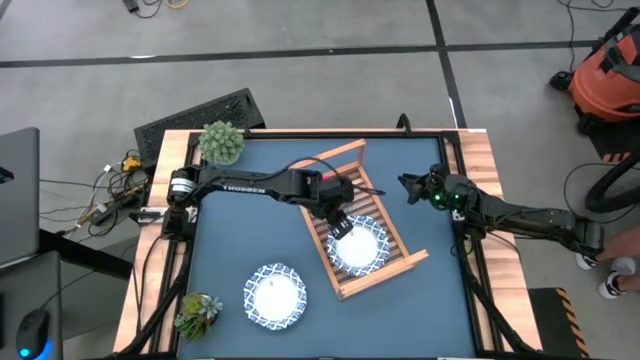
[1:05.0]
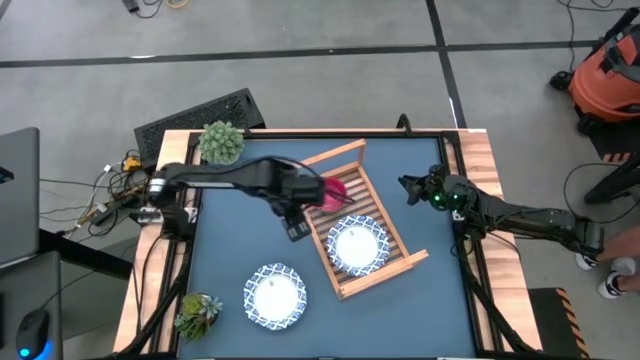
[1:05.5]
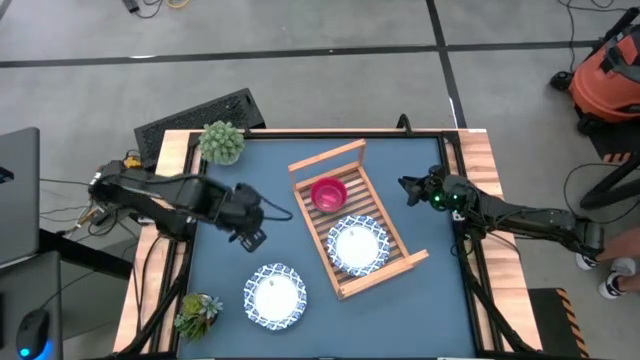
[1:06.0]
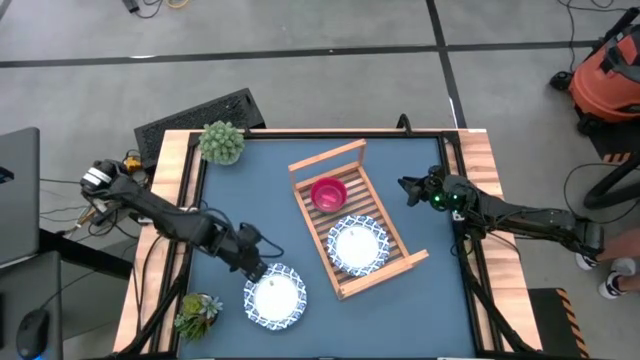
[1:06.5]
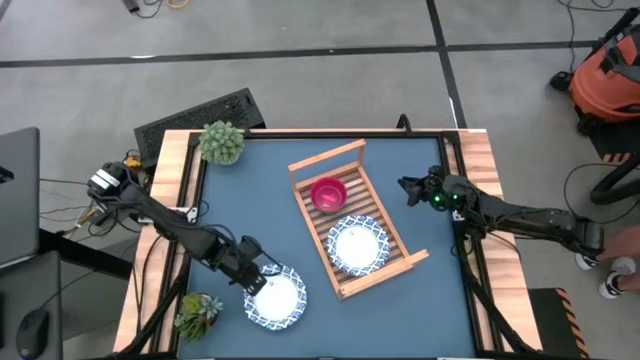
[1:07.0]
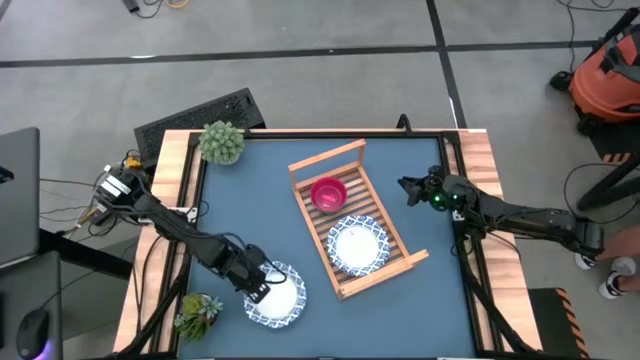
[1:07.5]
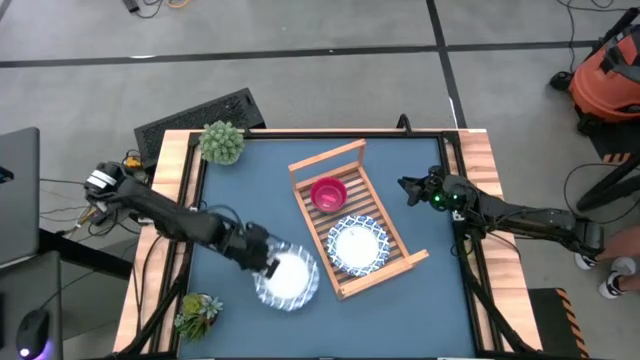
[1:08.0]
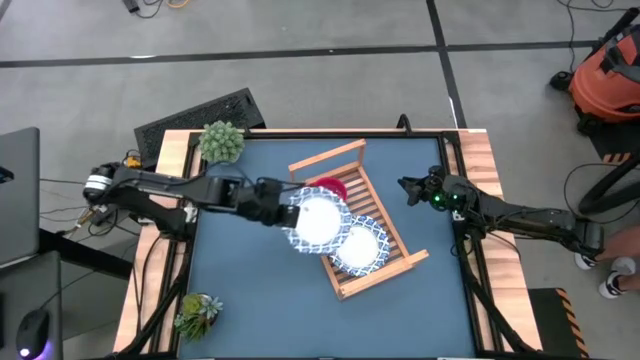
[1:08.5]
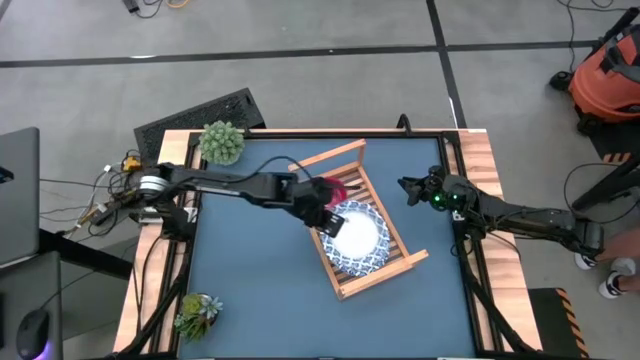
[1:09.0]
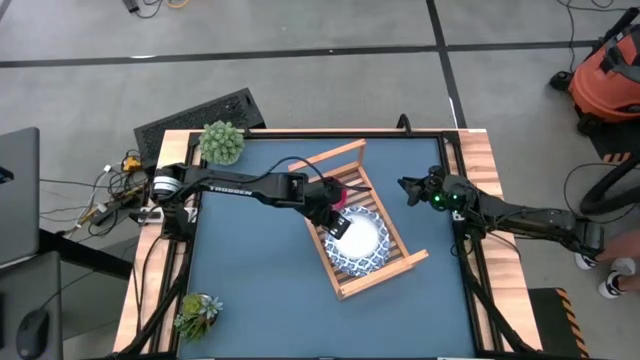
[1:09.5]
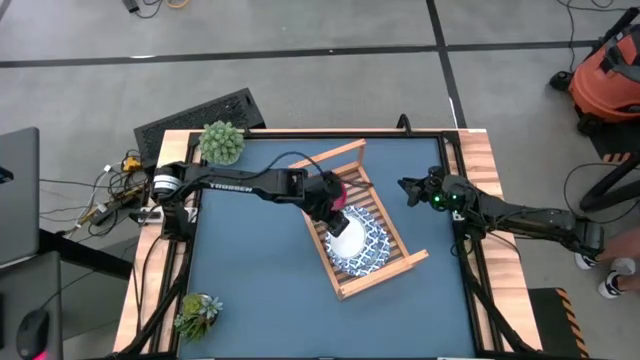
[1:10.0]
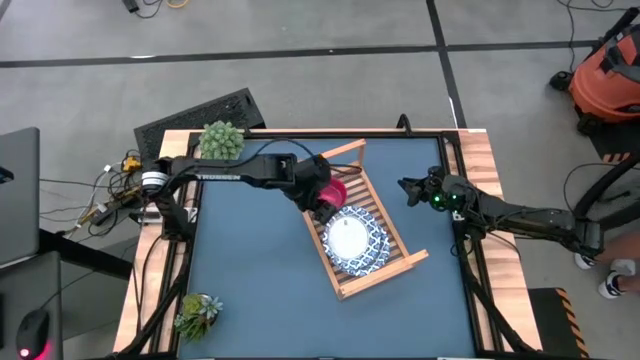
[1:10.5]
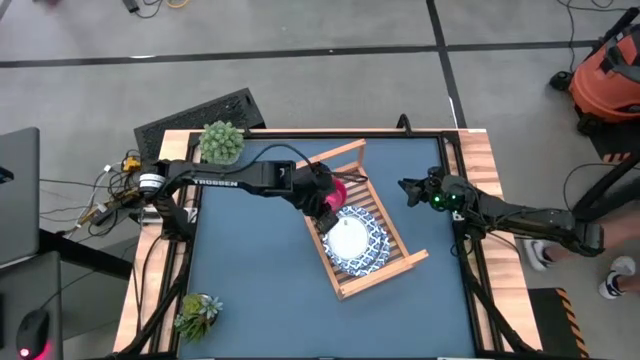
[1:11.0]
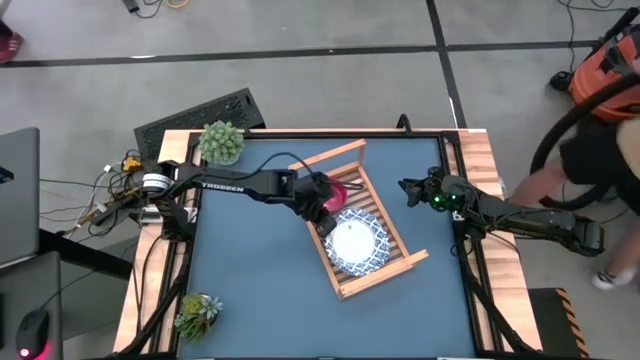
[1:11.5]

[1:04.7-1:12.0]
Task: Place and stack bowls onto a shelf
Stack the white blue bowl on top of the white blue bowl on the shelf

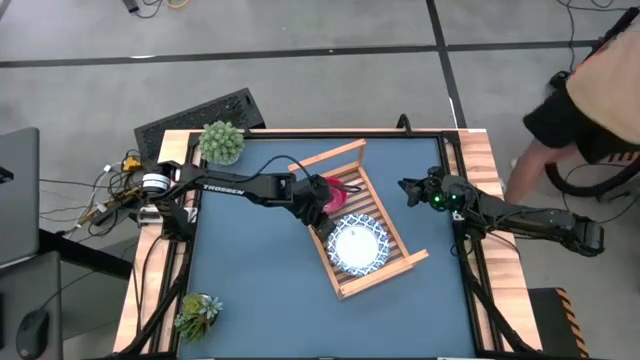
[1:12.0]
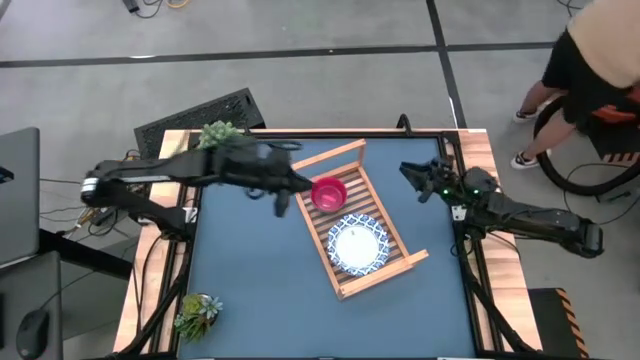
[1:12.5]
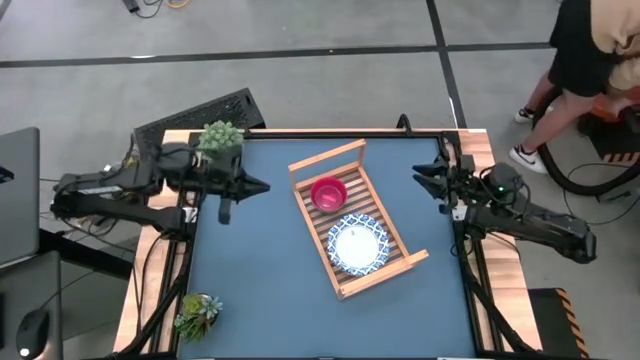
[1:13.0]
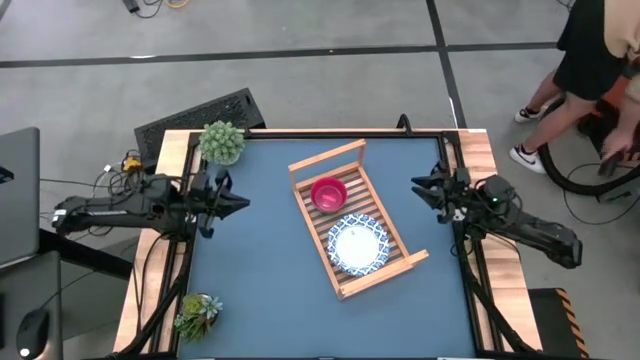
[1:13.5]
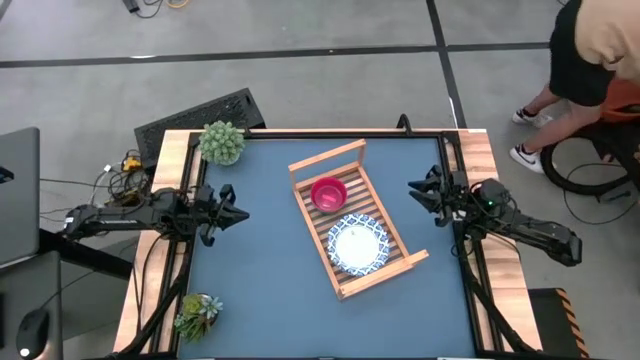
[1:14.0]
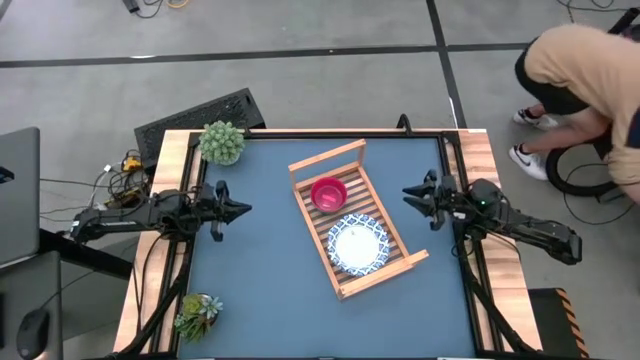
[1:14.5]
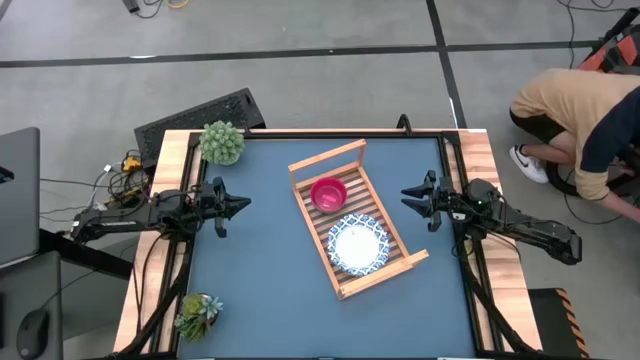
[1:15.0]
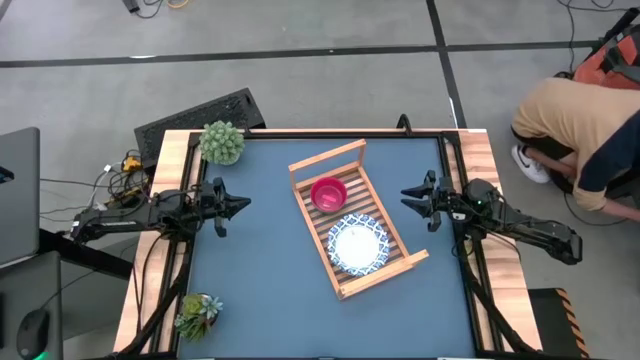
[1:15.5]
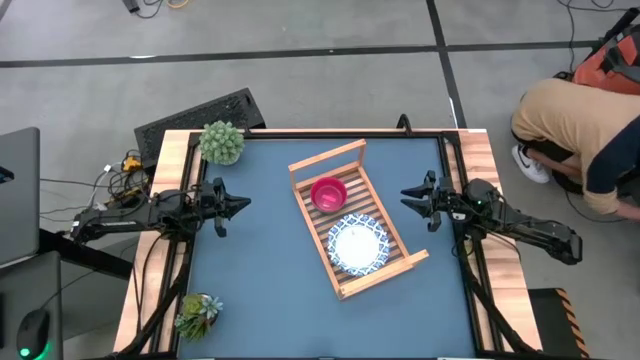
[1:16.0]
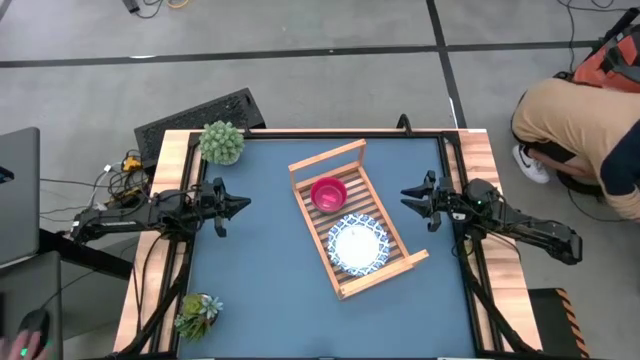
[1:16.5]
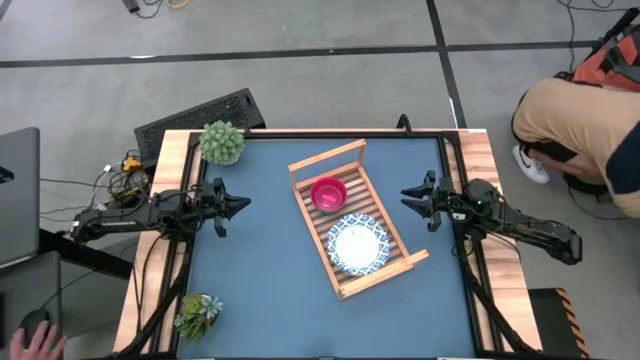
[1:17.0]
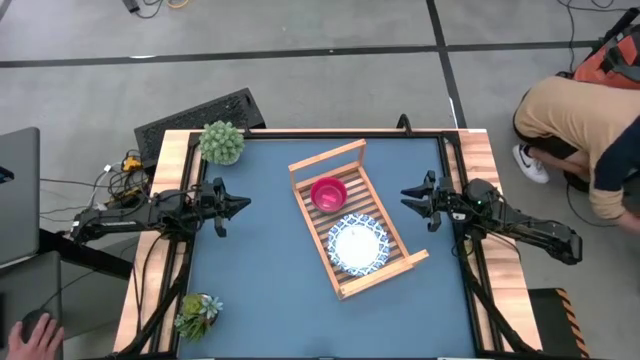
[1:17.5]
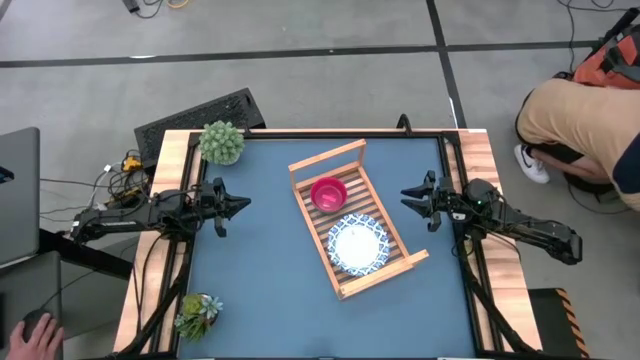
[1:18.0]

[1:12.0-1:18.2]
Return to Home Position

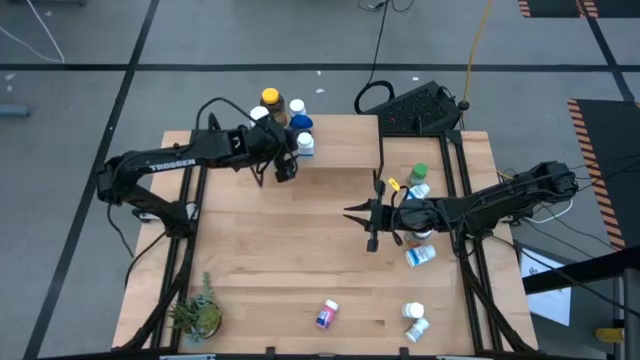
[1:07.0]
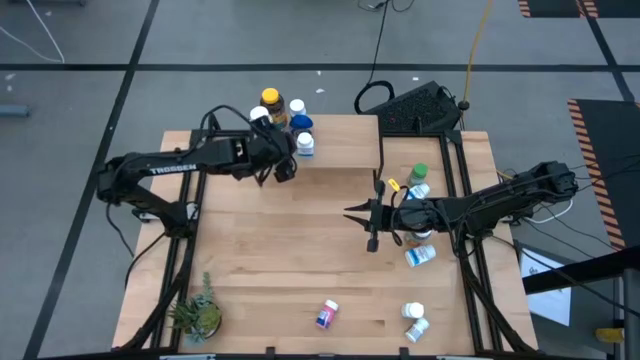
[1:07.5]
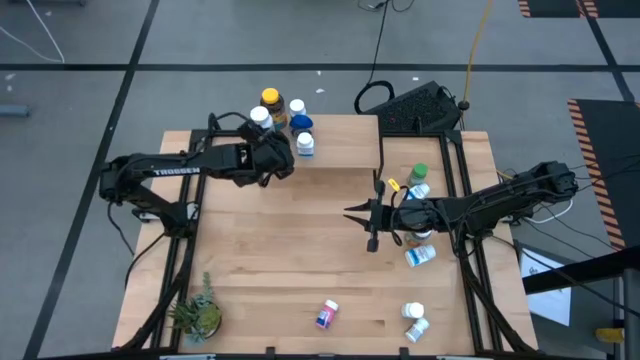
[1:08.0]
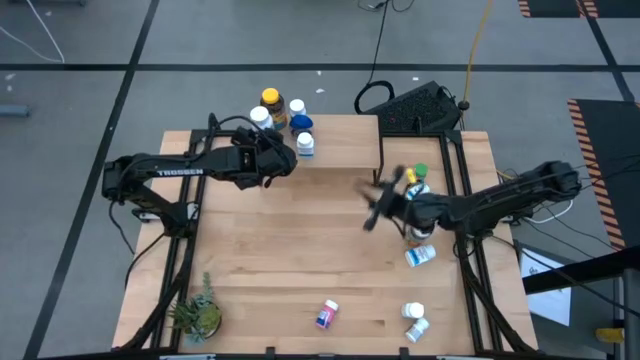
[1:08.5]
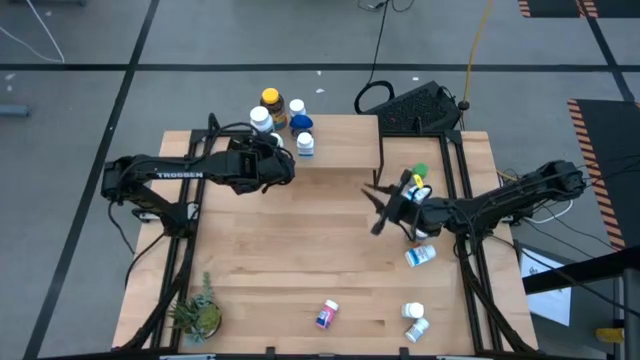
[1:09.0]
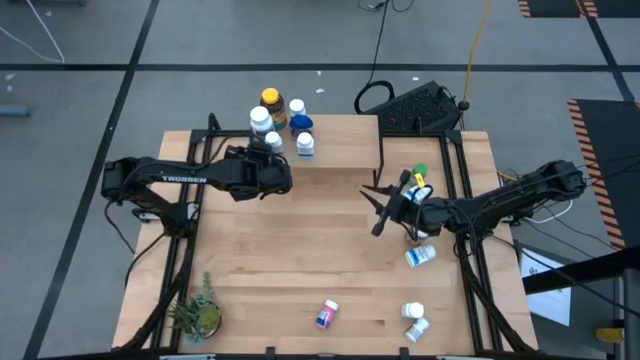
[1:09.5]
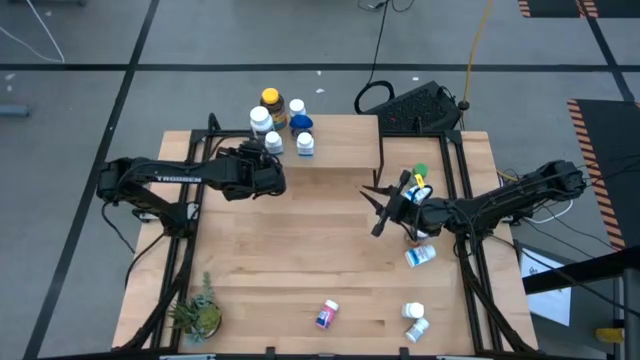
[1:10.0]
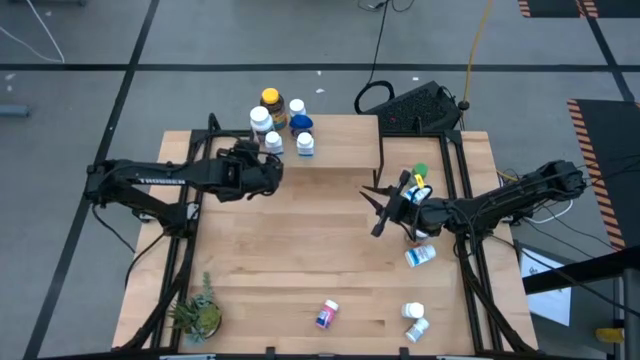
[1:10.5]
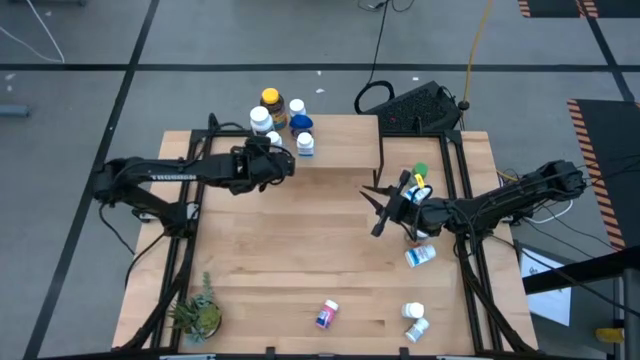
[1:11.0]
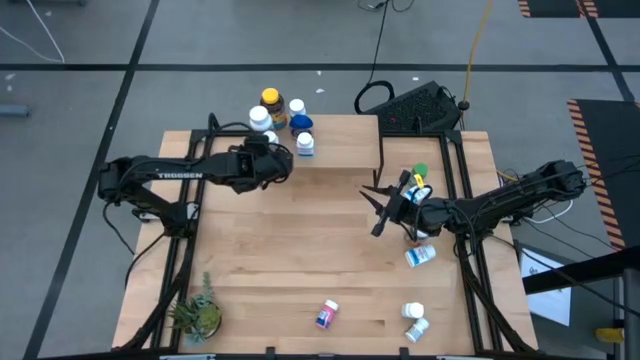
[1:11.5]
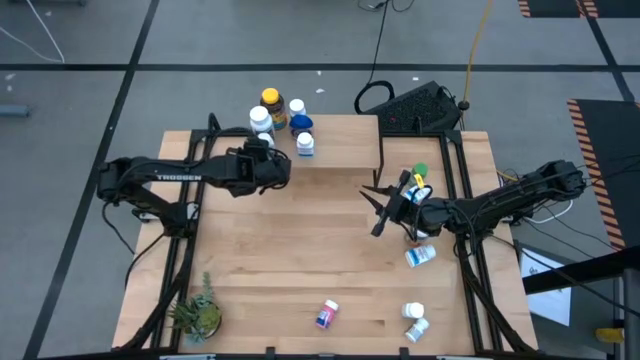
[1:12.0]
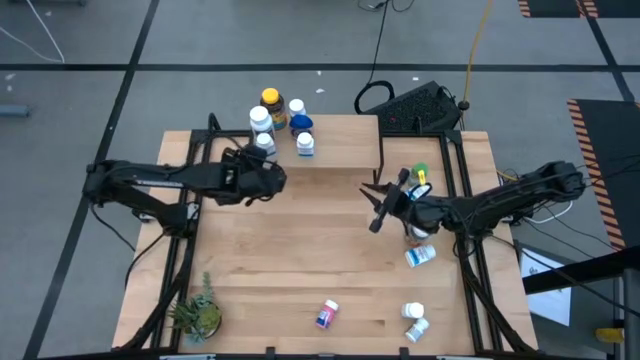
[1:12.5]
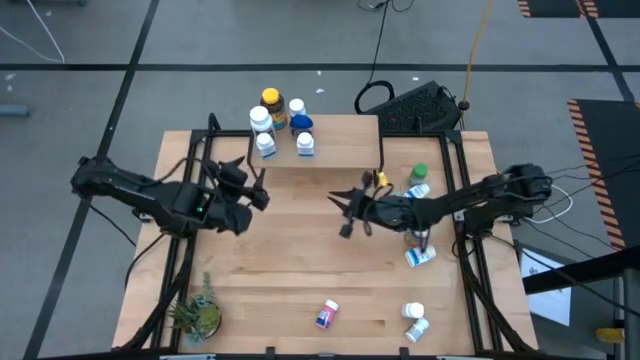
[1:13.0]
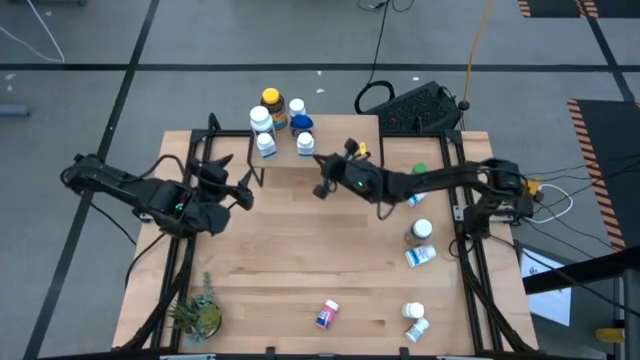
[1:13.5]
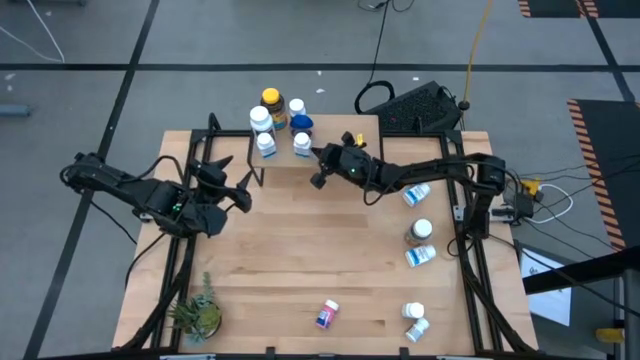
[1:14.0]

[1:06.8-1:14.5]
Task: Pick and place medicine bottles onto shelf by color
Adjust the white medicine bottles on the shelf

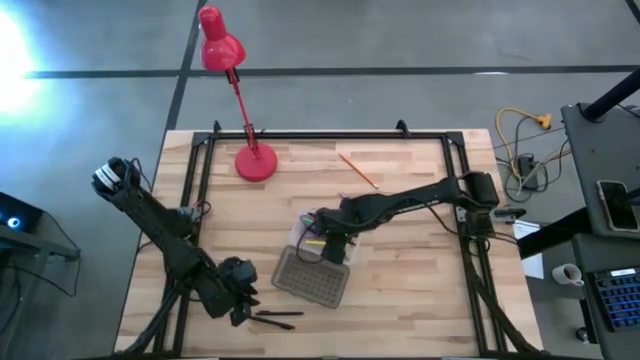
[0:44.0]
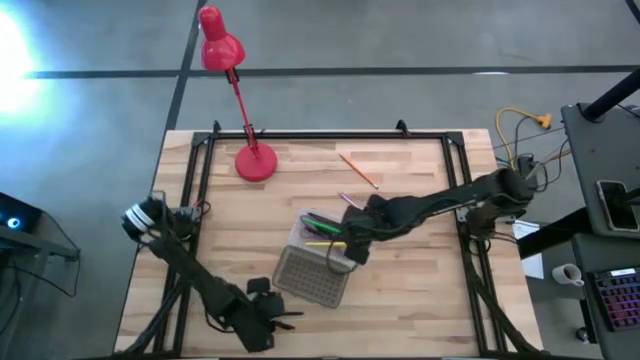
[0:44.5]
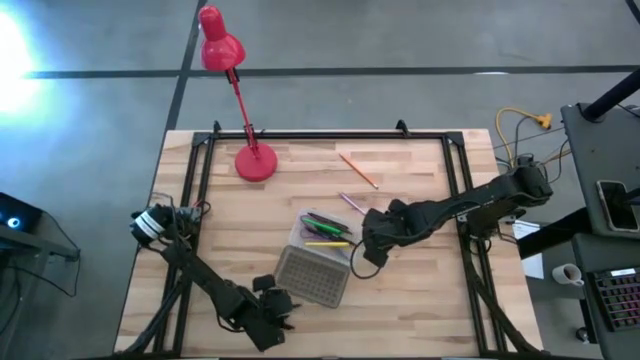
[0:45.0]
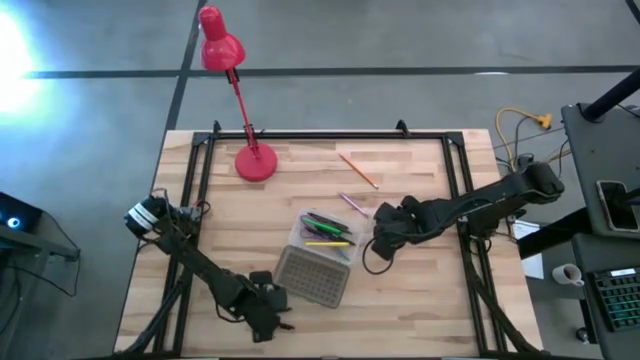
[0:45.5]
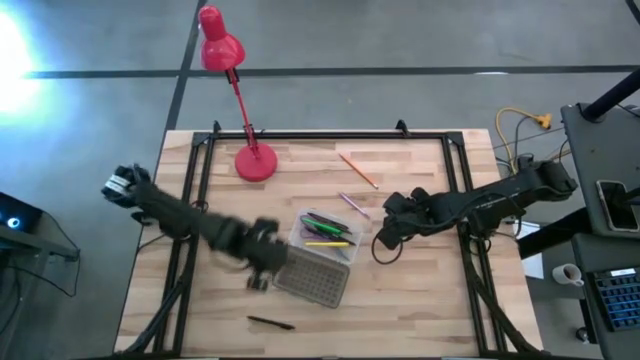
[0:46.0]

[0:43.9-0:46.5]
Task: Pick & place school supplies into a supply box
Put the black pen into the supply box
